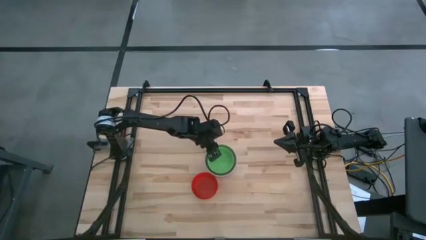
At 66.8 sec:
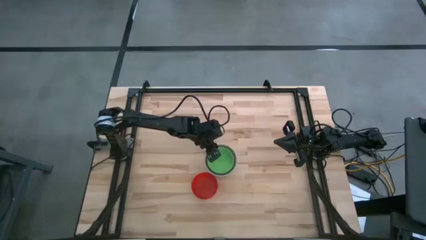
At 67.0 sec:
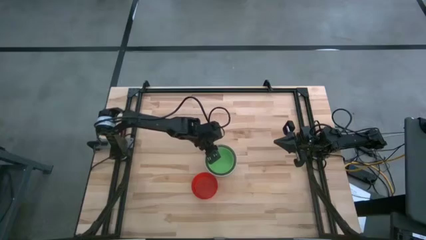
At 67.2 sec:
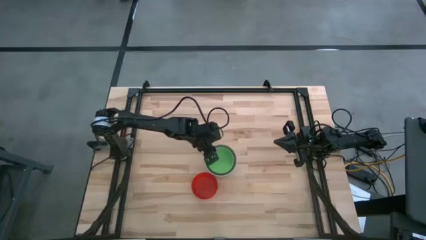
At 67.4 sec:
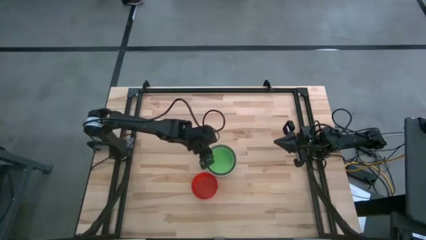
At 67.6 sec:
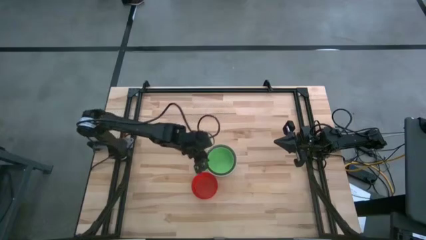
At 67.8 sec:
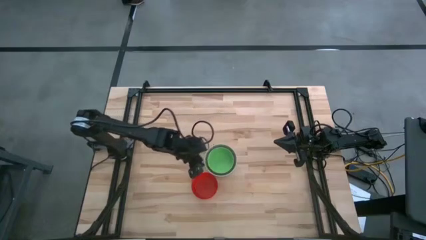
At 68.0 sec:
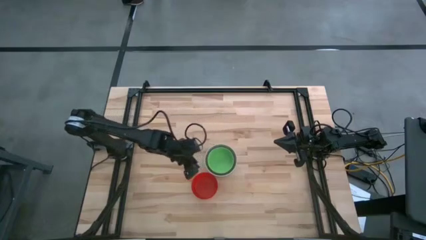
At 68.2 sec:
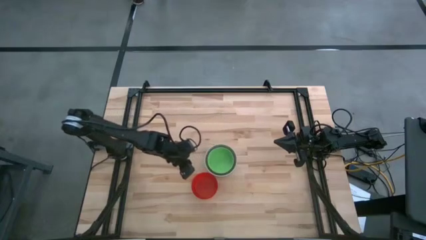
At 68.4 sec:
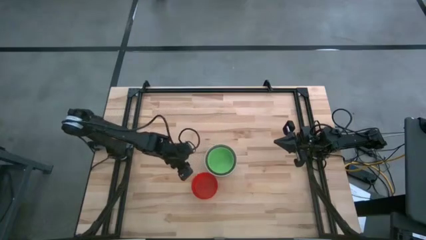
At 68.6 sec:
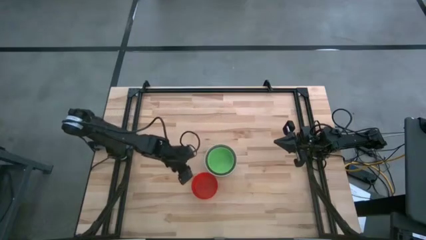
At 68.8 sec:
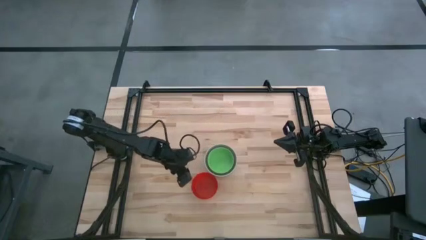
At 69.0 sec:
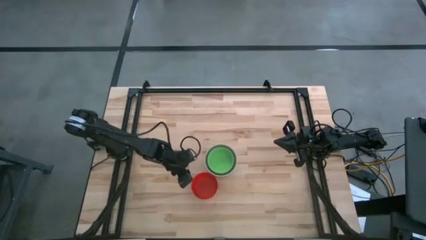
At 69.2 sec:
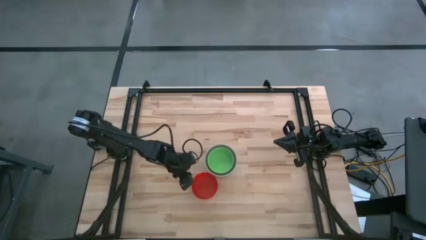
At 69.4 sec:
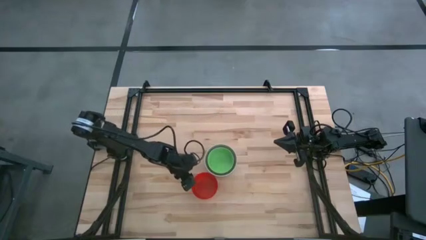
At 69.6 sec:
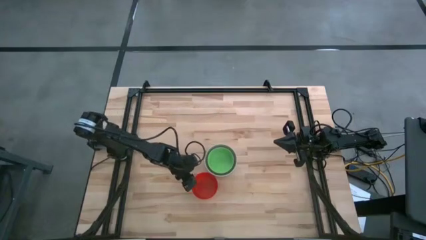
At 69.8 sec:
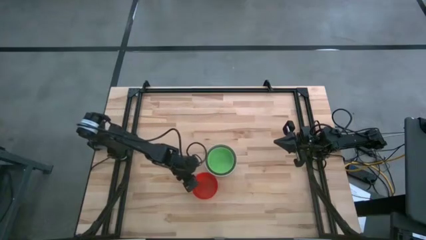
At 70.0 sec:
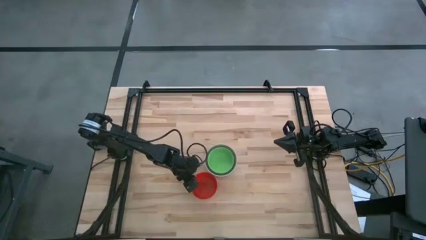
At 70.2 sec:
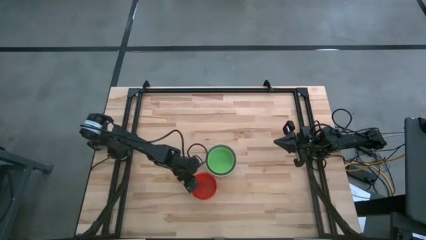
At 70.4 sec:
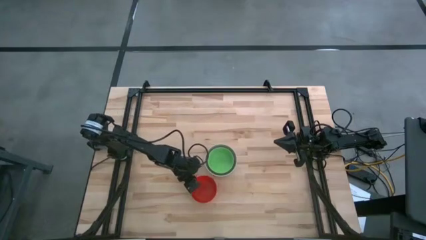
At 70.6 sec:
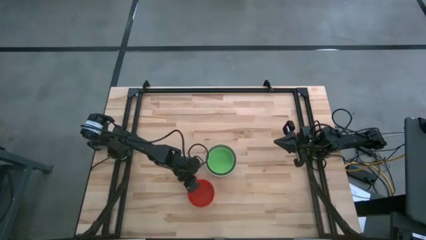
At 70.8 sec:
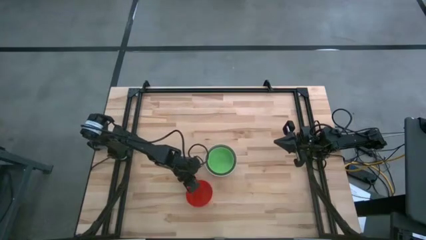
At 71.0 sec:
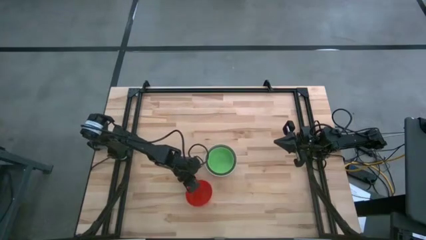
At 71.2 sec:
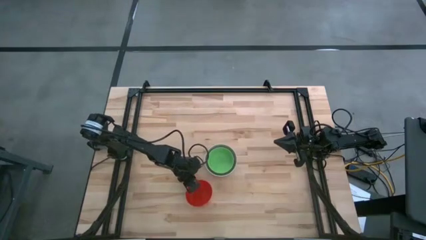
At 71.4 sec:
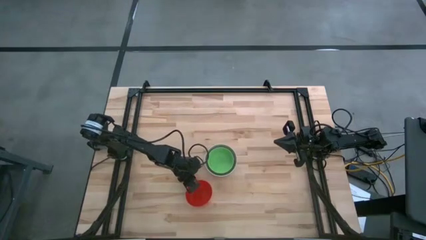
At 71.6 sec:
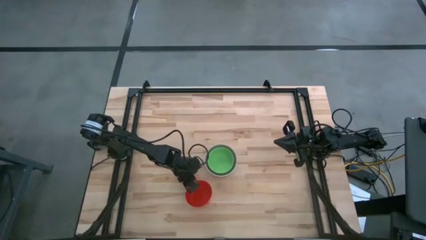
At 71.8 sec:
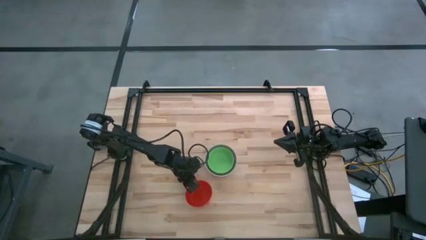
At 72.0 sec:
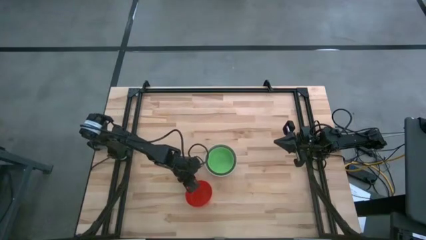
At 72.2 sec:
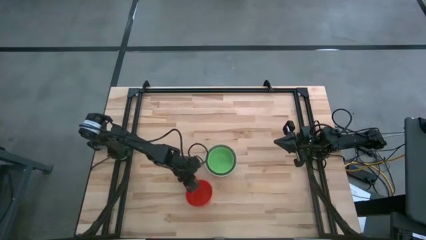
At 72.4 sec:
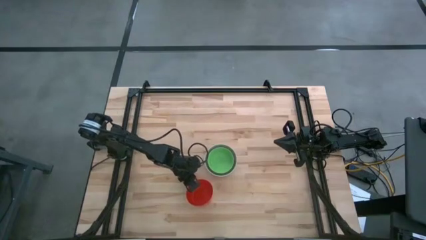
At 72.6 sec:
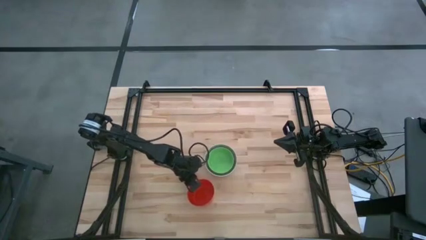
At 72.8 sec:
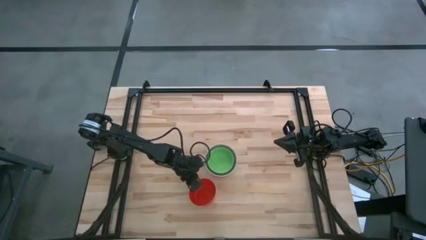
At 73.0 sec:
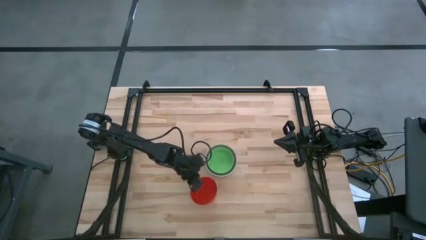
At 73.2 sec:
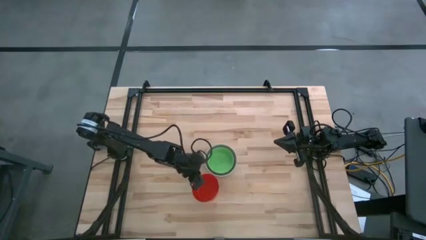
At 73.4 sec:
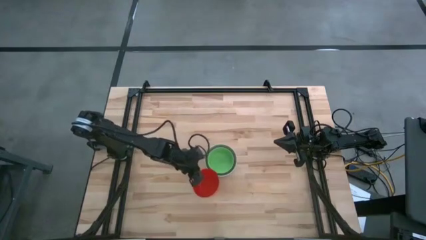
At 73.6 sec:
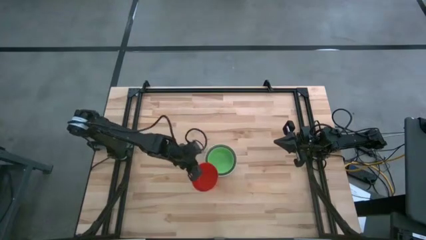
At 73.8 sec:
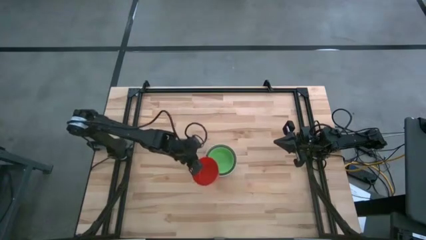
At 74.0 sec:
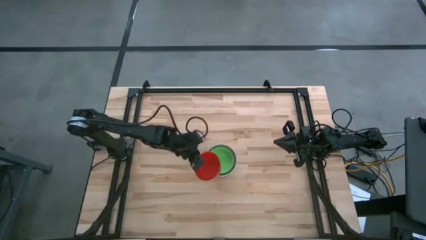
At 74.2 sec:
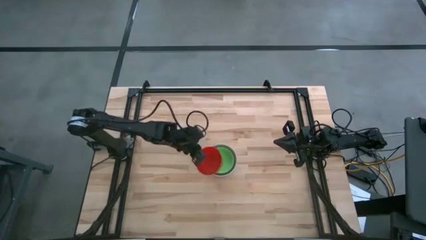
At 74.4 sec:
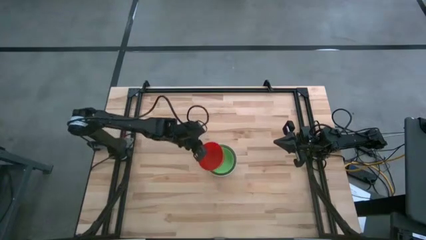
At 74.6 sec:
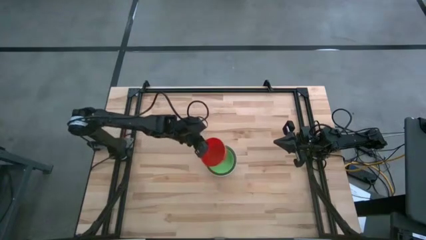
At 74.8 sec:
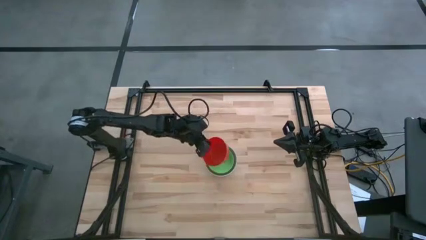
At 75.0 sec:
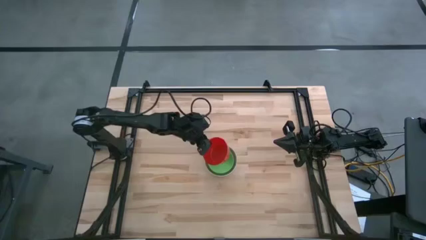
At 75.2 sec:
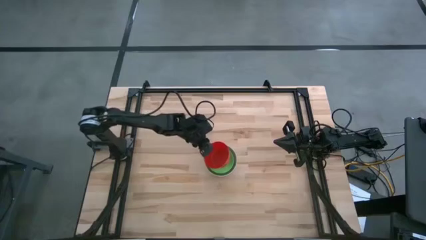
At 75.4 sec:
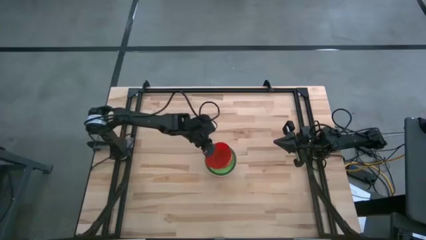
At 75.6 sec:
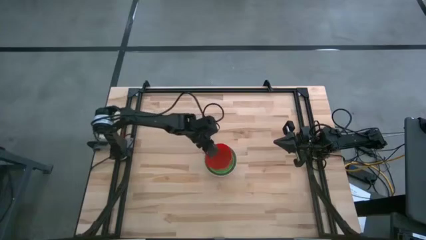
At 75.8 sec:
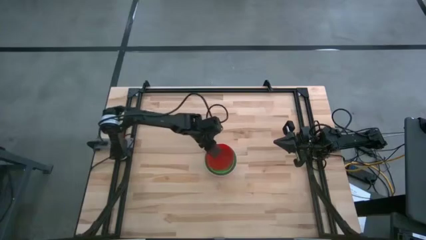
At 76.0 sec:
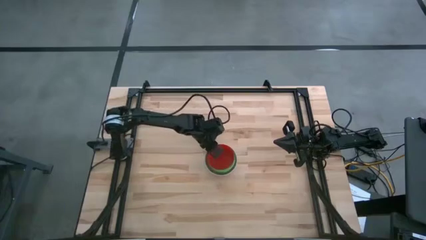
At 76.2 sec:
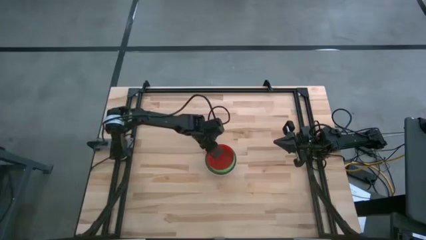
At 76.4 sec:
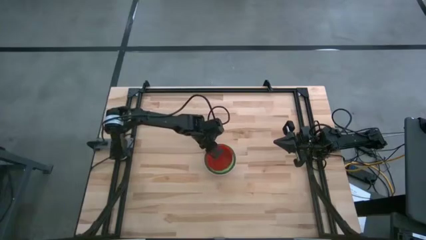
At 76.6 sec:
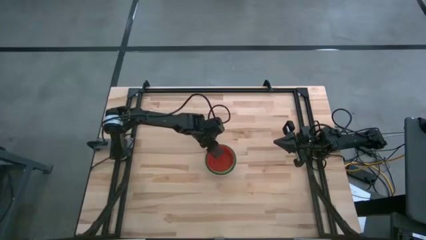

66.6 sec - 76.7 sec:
Stack the red bowl on the green bowl
